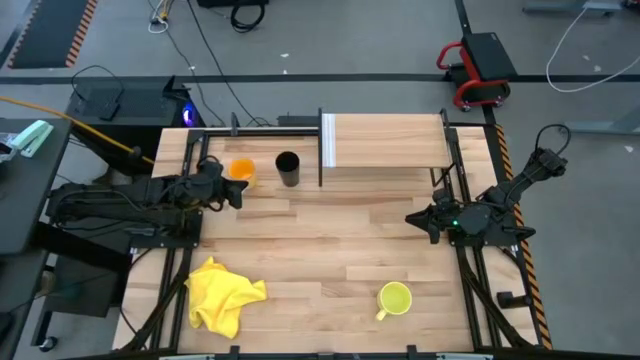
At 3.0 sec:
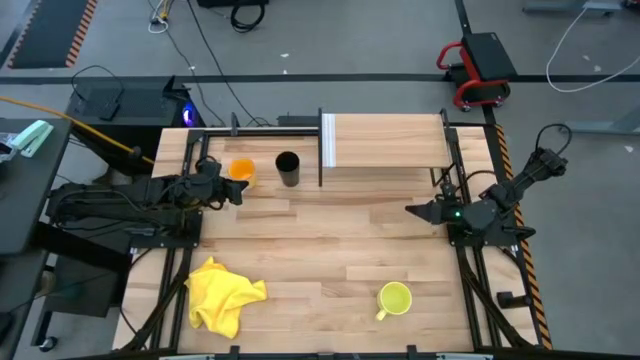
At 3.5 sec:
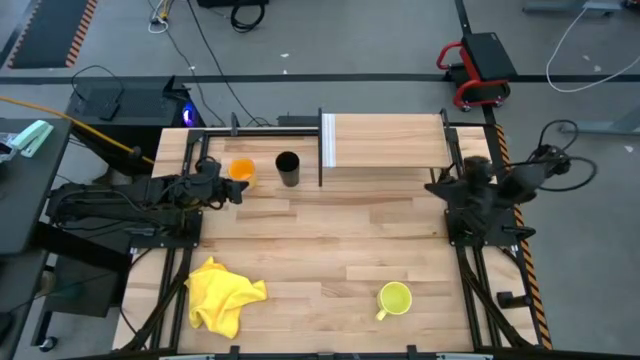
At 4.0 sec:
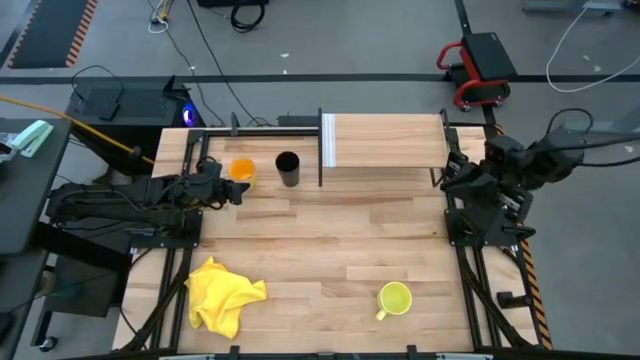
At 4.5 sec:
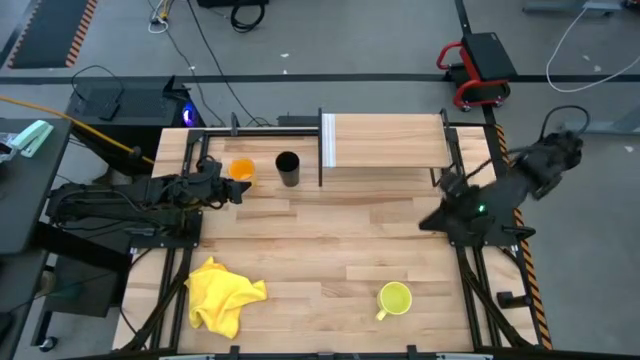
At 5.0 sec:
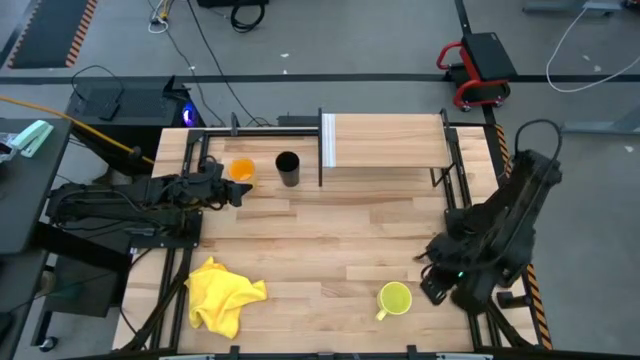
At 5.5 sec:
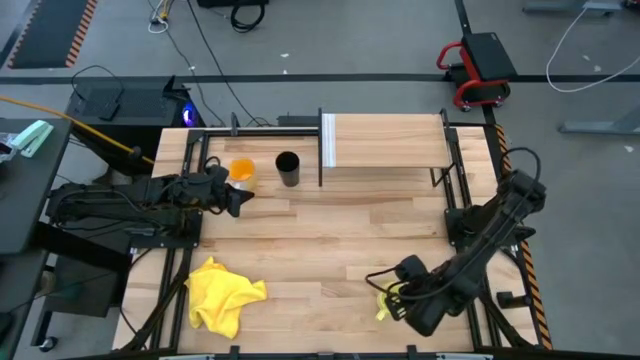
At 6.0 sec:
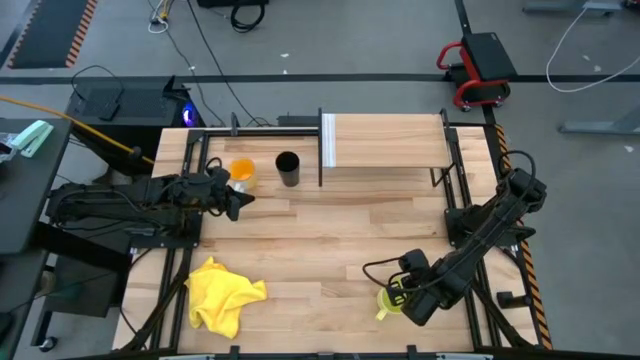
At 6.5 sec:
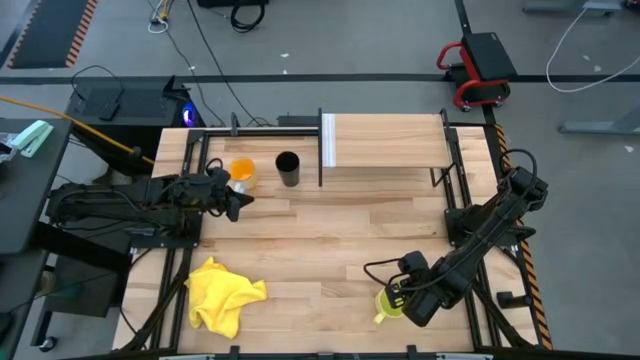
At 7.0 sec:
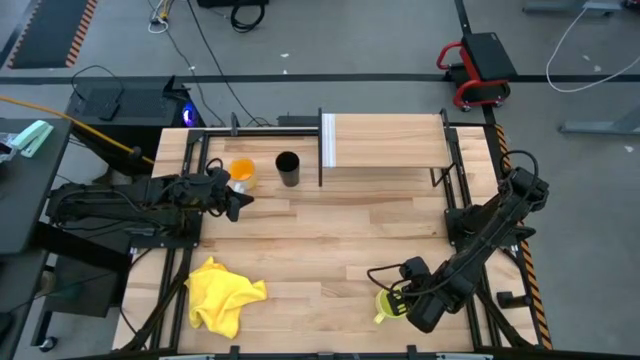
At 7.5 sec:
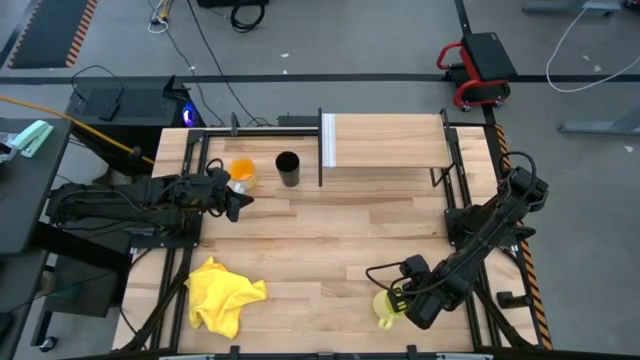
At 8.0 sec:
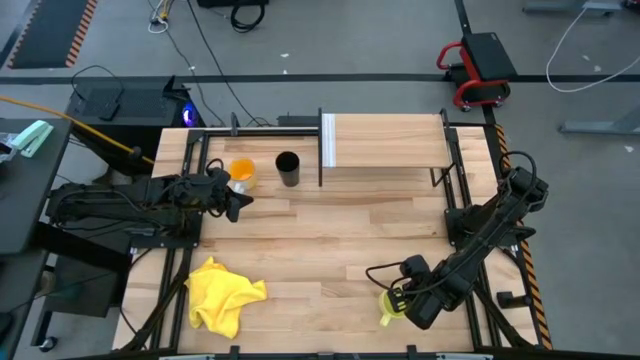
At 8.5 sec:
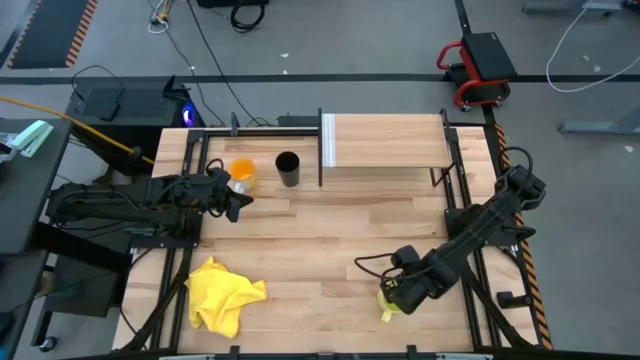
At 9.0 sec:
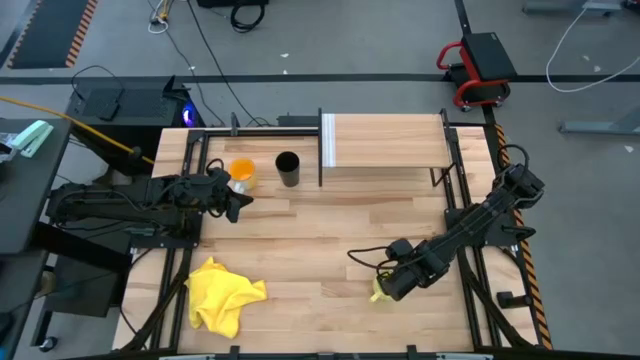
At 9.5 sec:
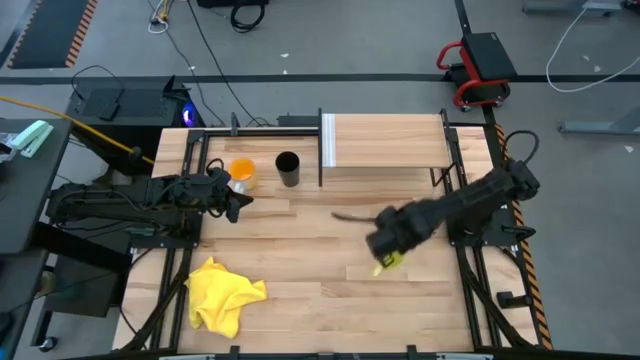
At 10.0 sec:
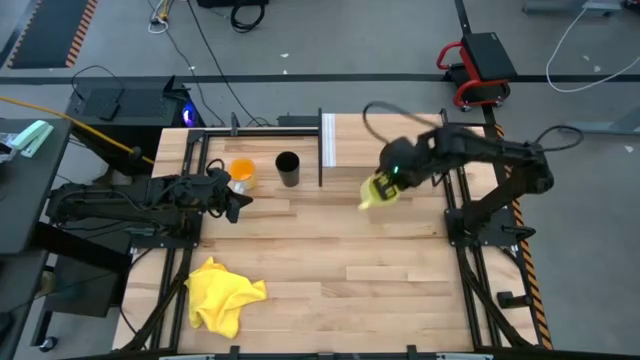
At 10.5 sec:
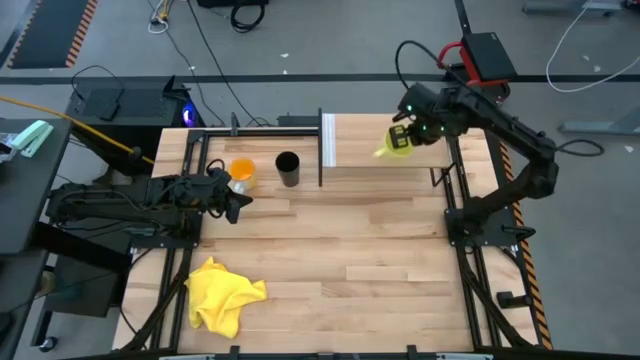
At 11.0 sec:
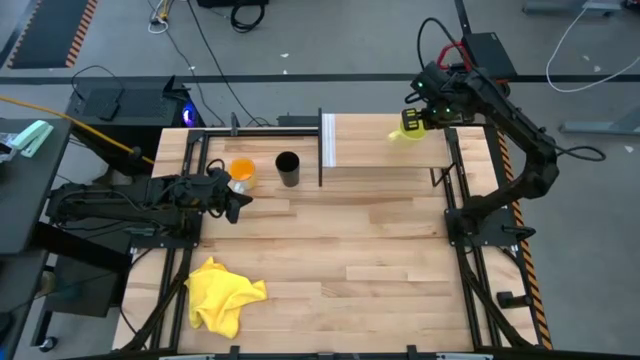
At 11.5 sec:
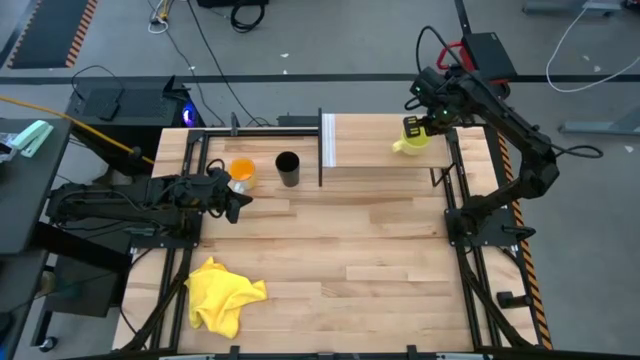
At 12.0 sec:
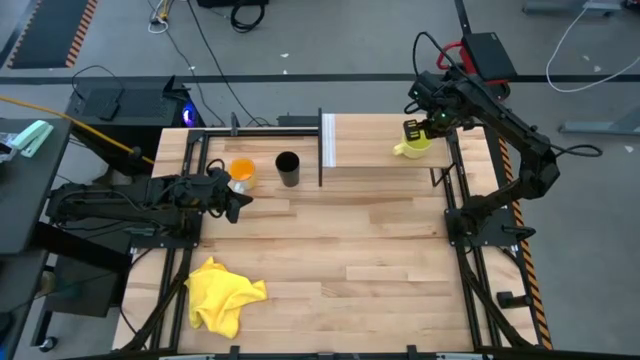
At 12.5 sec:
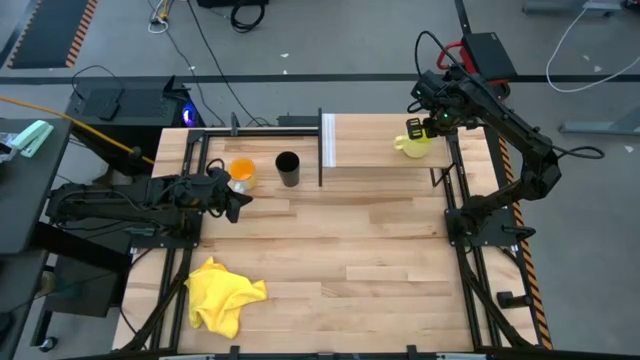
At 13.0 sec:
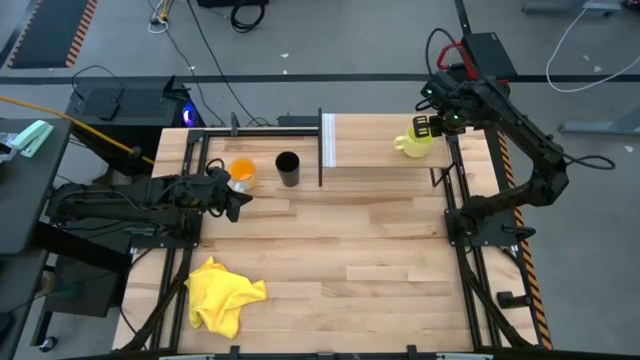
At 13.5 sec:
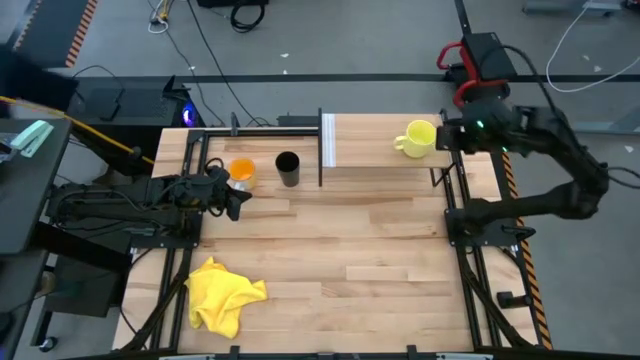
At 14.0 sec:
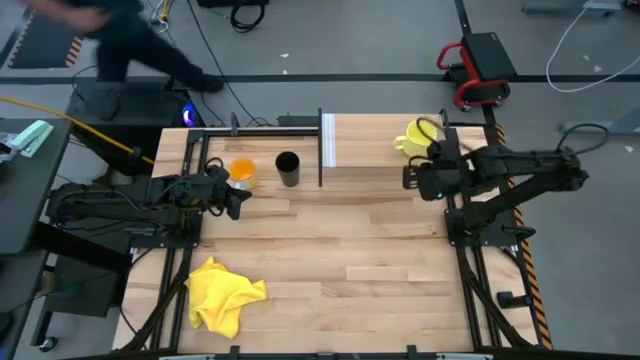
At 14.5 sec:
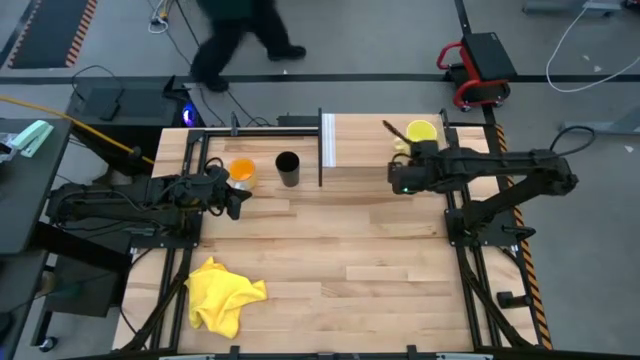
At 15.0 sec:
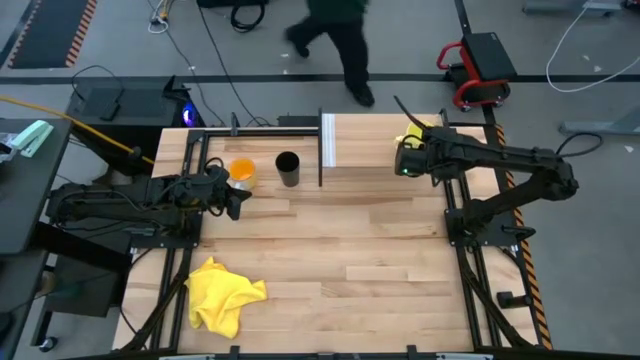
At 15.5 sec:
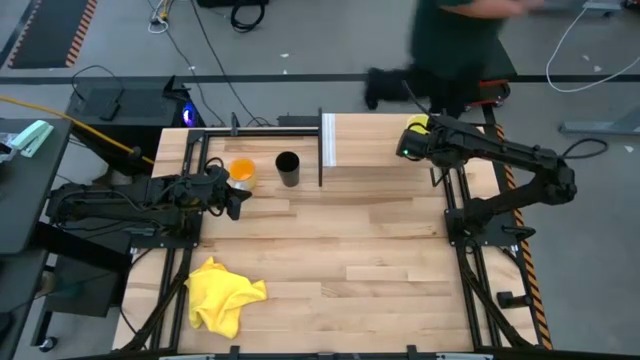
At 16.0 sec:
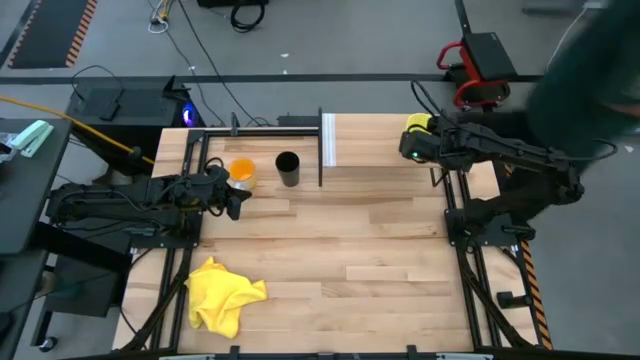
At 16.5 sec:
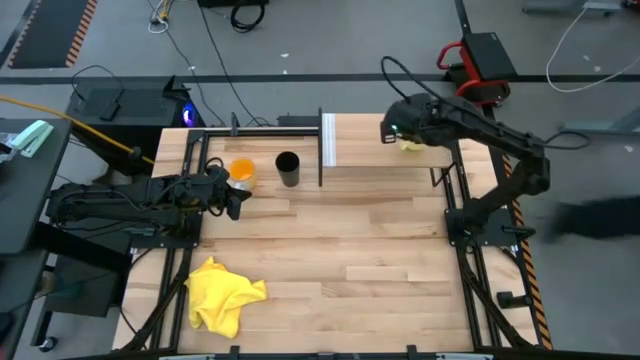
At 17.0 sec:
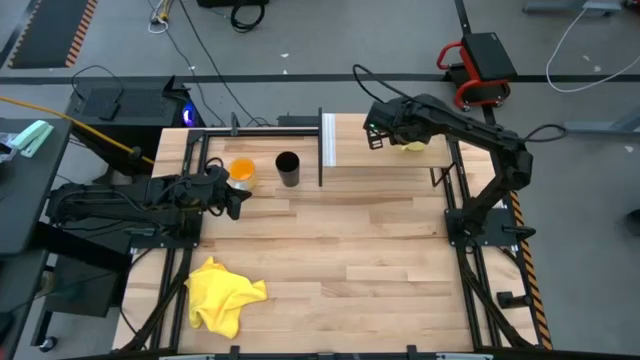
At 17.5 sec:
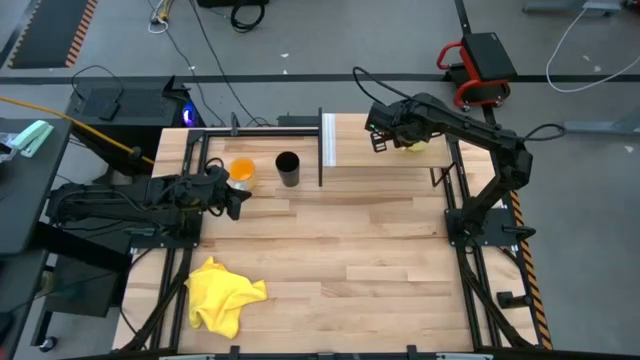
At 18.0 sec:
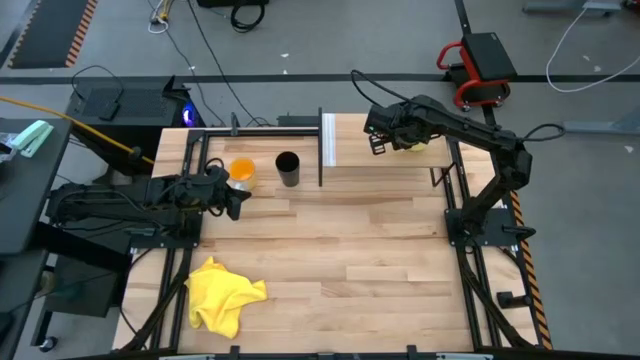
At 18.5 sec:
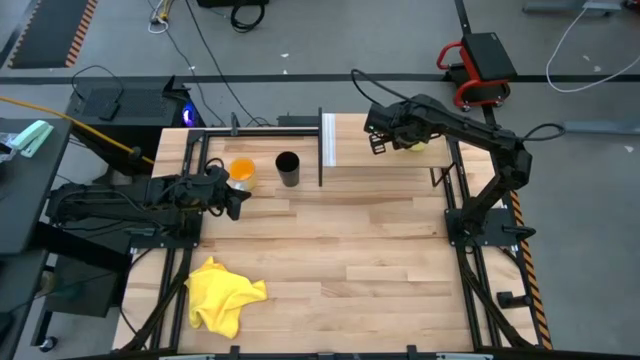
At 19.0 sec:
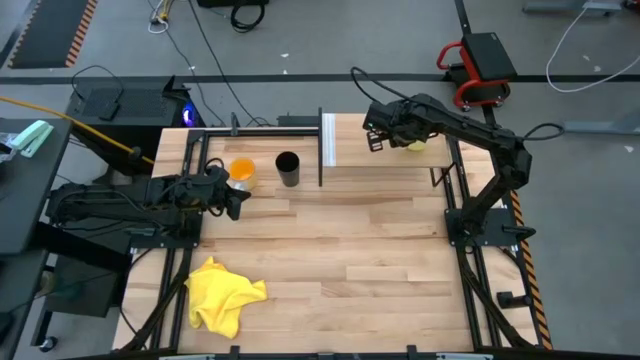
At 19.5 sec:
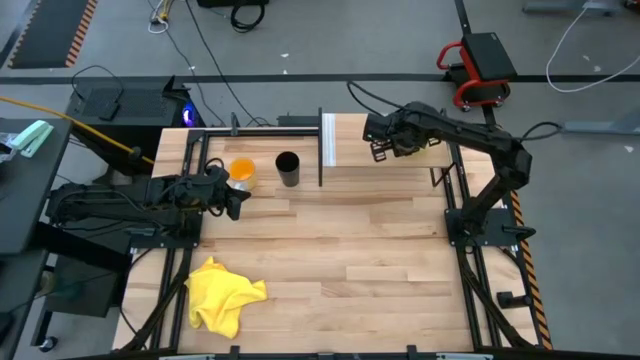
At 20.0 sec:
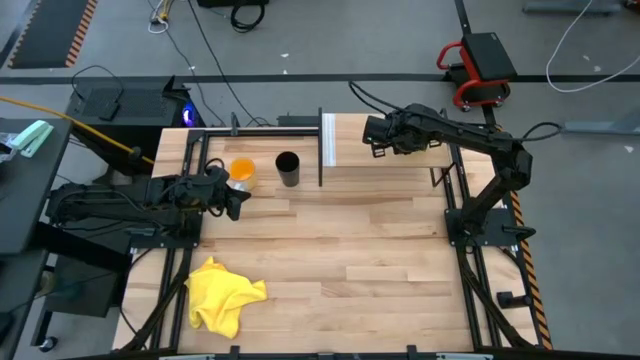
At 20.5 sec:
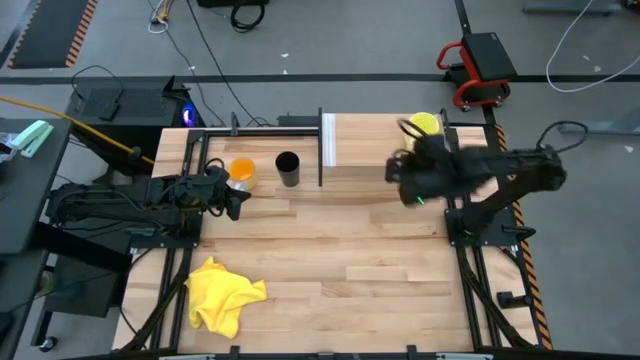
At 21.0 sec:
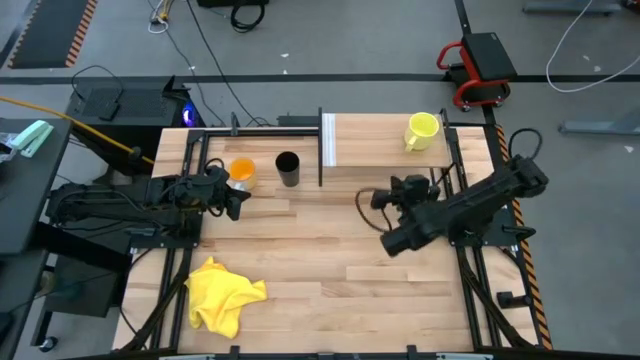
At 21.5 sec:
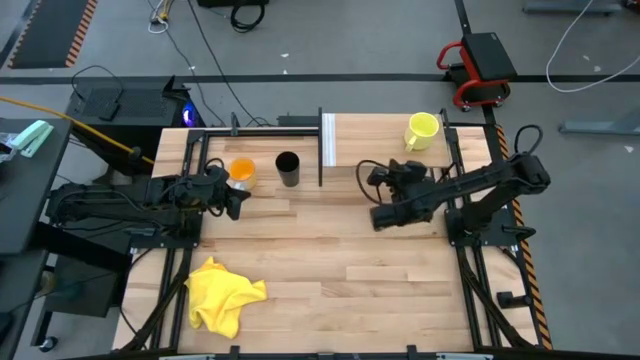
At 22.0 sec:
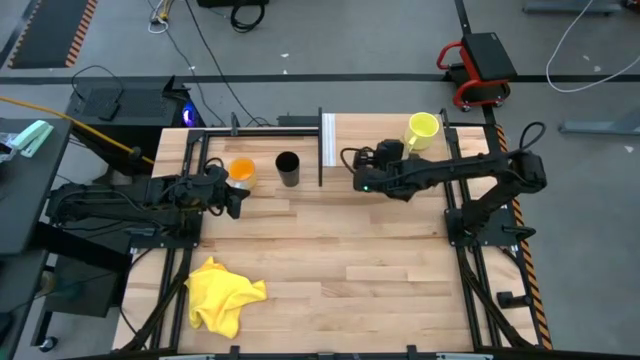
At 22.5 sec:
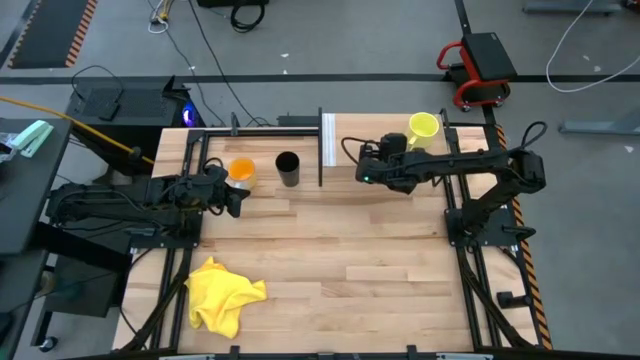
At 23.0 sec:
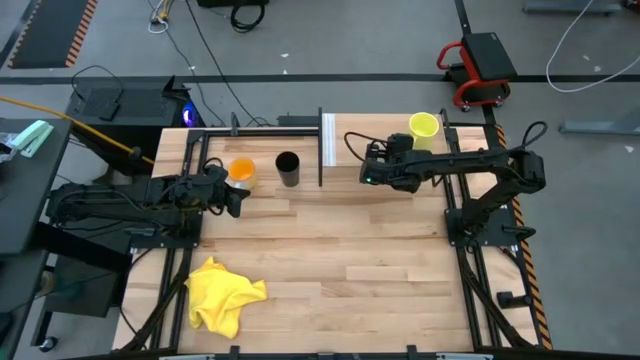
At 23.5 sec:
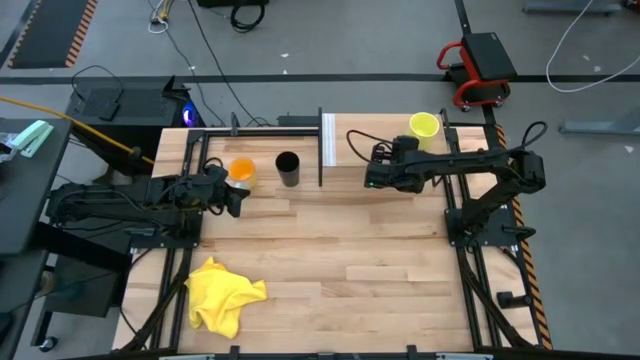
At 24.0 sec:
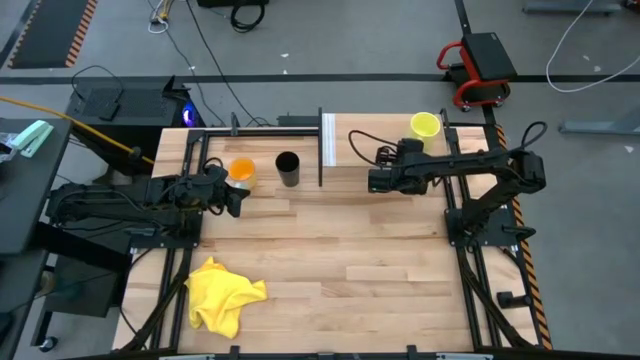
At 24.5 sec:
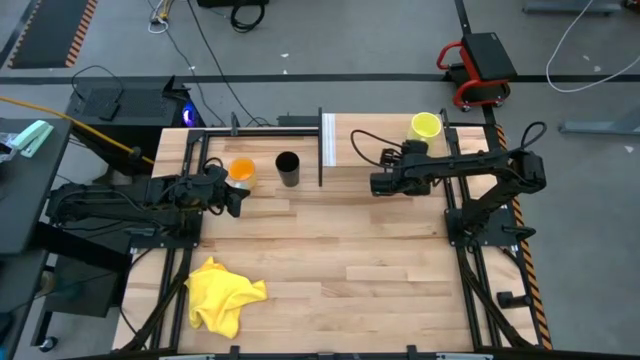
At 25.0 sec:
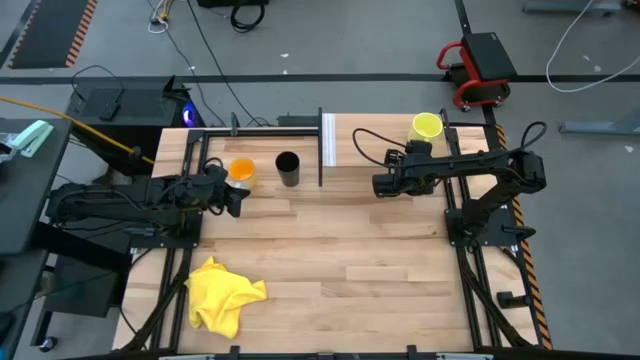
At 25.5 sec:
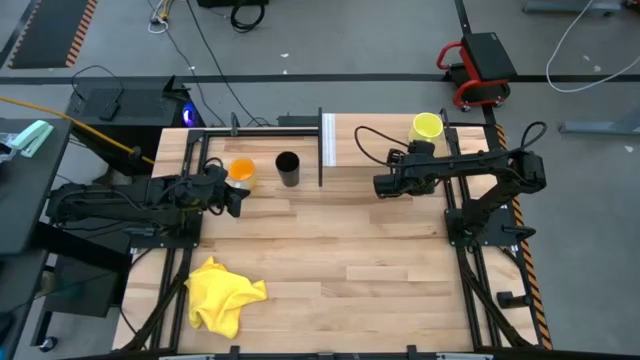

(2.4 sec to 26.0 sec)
Task: Stack small to large cups/mugs on shelf
Put the yellow mug on the shelf
